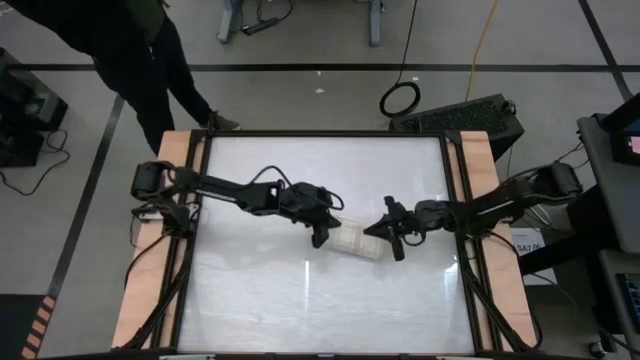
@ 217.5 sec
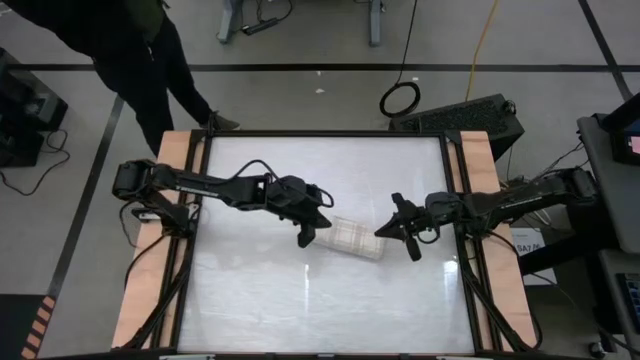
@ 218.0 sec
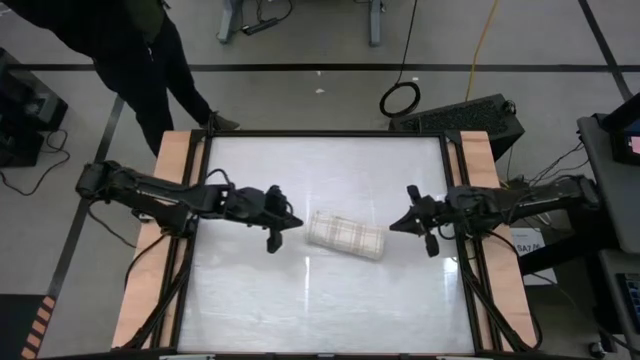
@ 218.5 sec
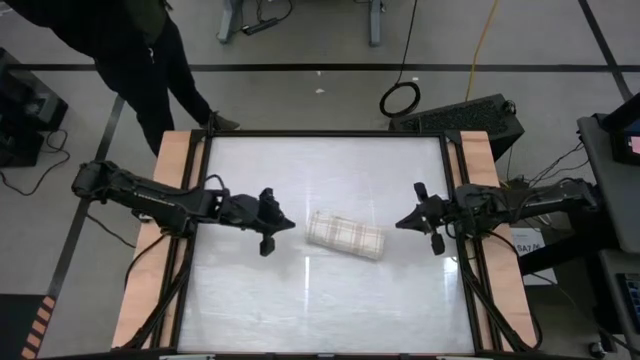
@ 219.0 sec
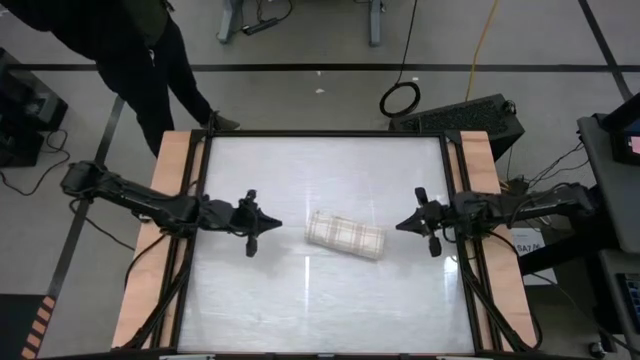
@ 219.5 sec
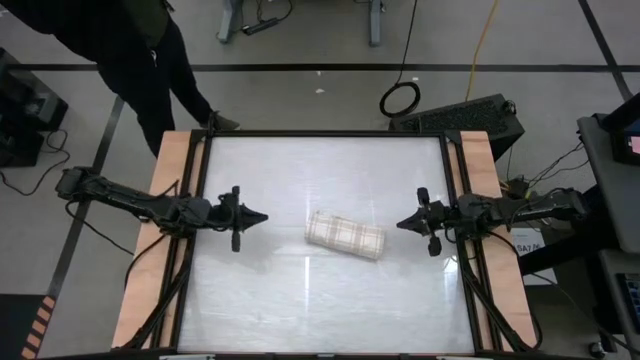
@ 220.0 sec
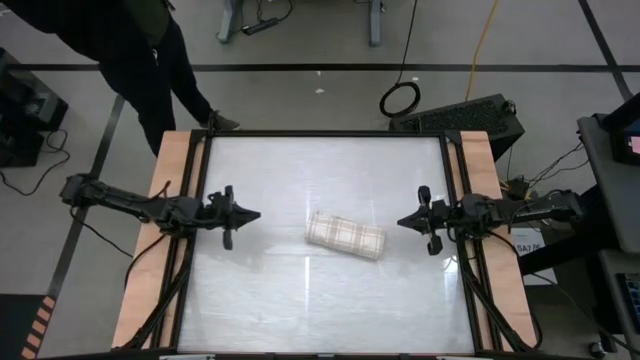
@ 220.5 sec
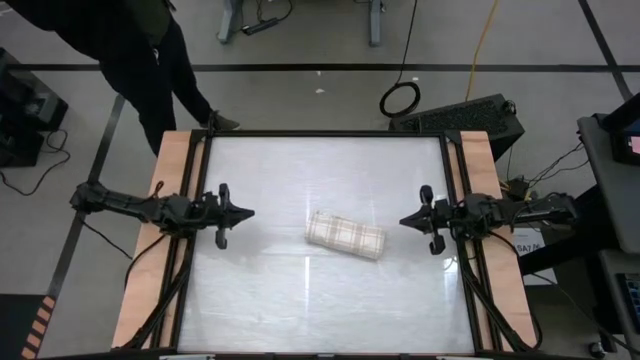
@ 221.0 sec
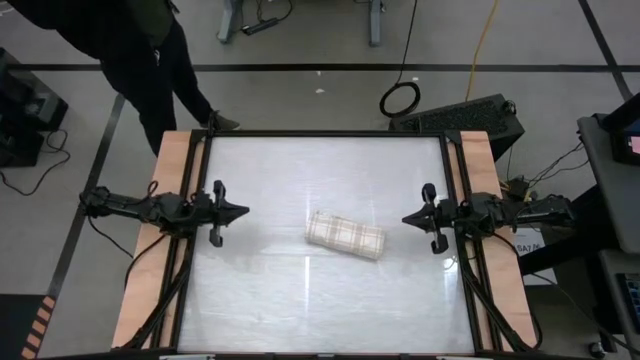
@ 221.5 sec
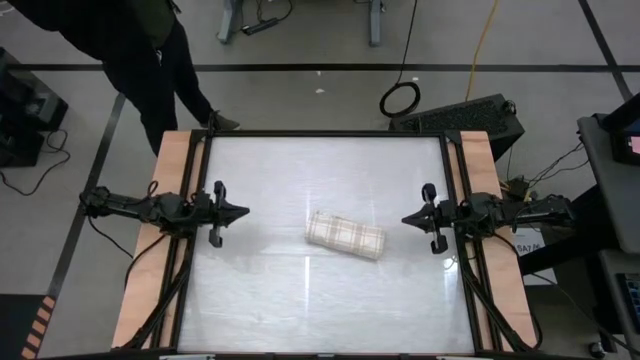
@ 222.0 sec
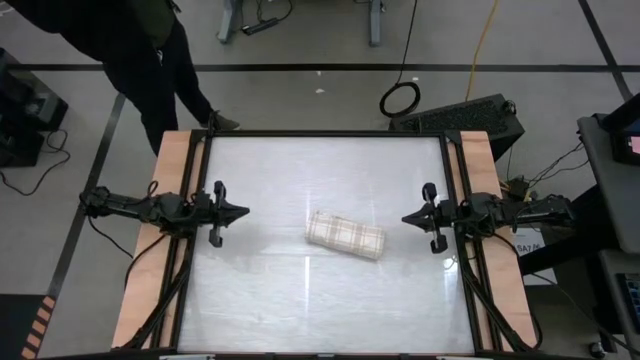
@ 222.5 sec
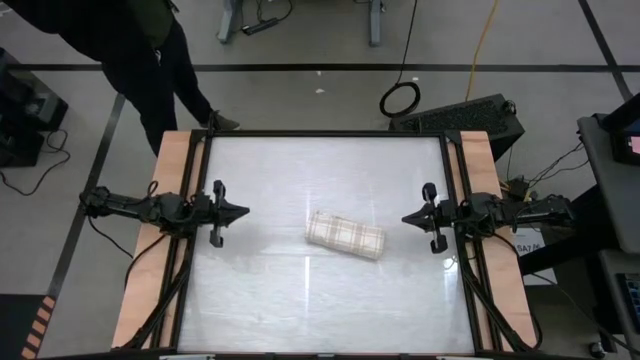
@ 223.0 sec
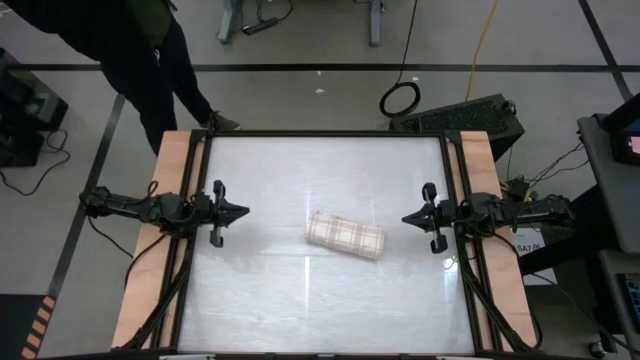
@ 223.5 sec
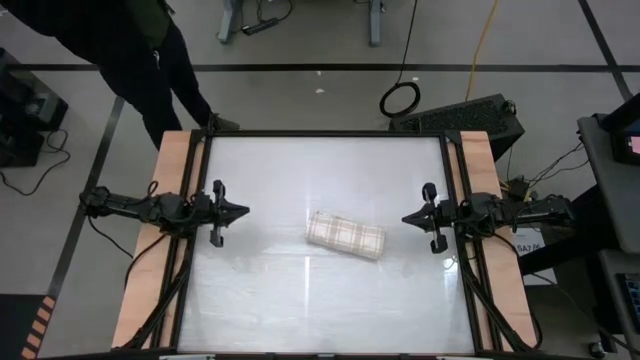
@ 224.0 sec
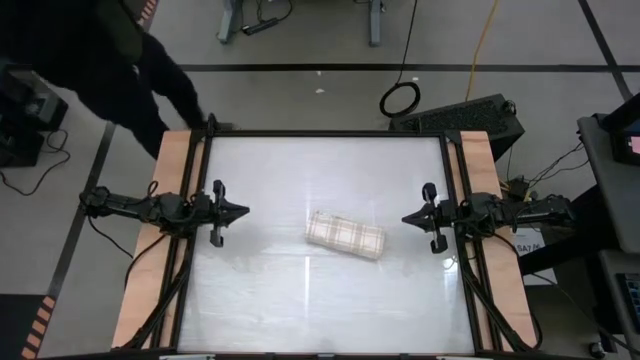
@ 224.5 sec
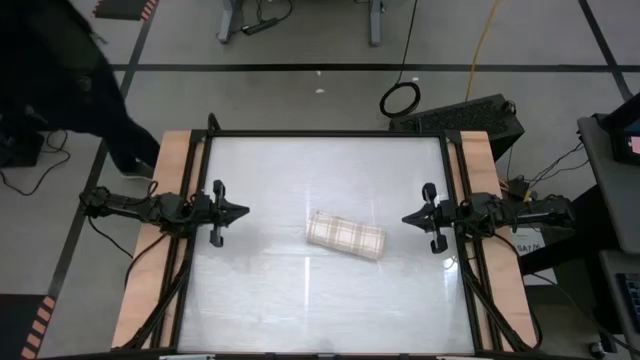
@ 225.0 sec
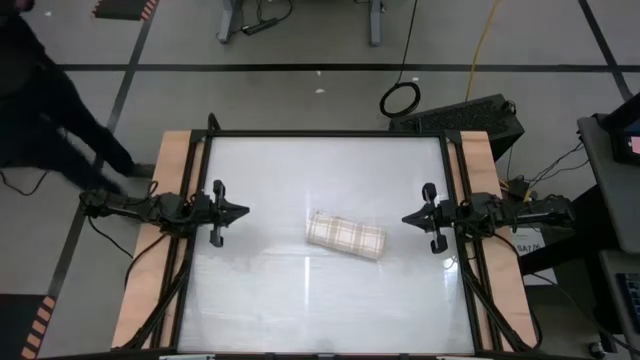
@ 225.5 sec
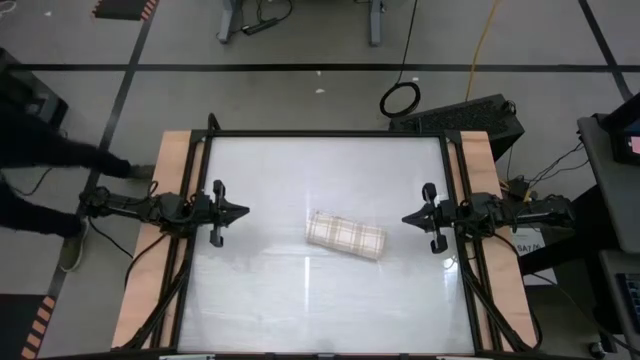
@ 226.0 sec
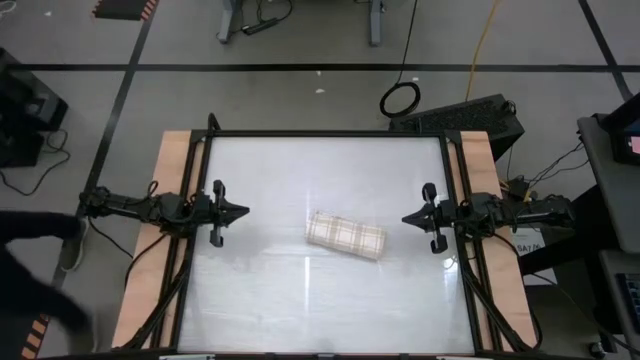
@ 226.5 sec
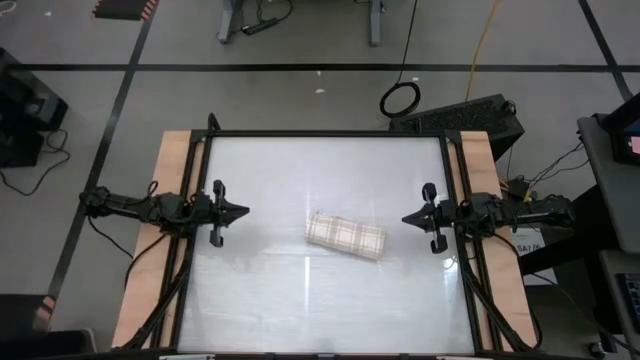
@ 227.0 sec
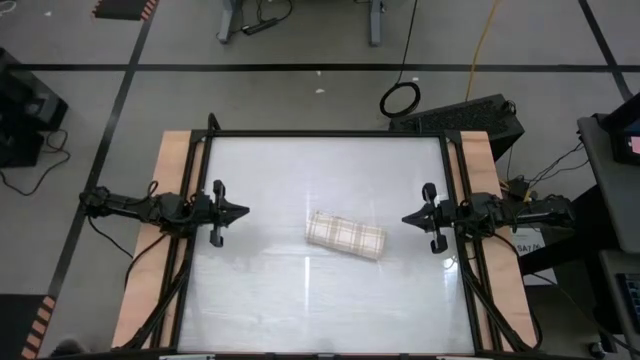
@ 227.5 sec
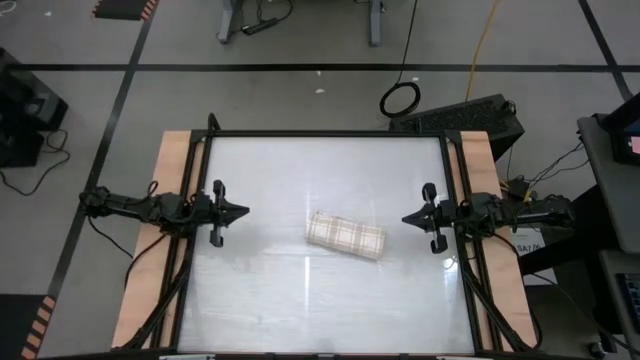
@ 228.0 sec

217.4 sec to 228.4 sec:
Task: Roll towel
Return to Home Position

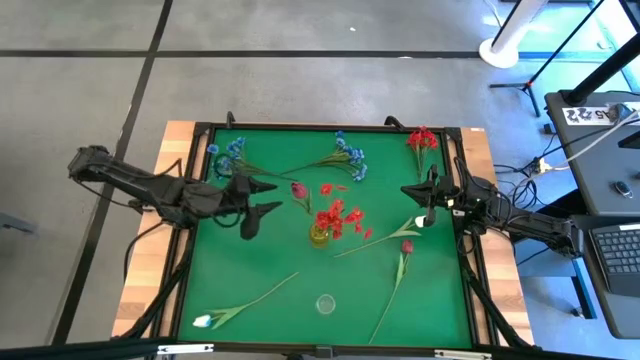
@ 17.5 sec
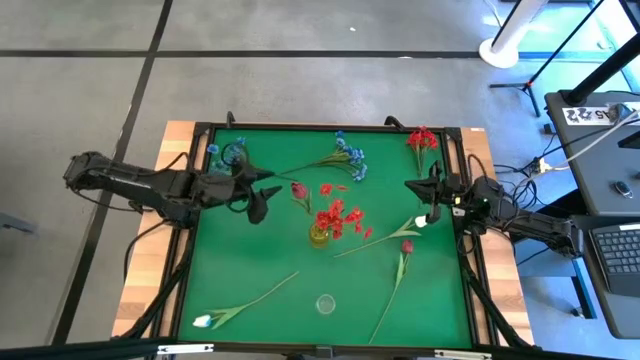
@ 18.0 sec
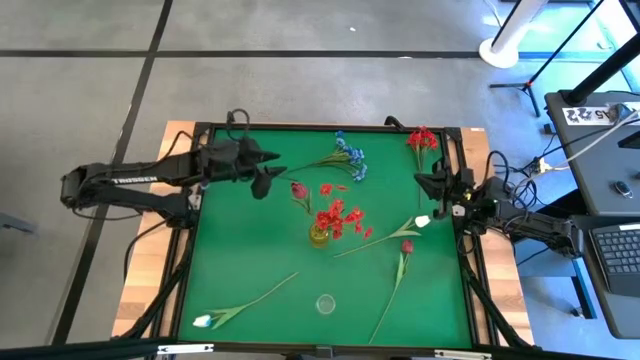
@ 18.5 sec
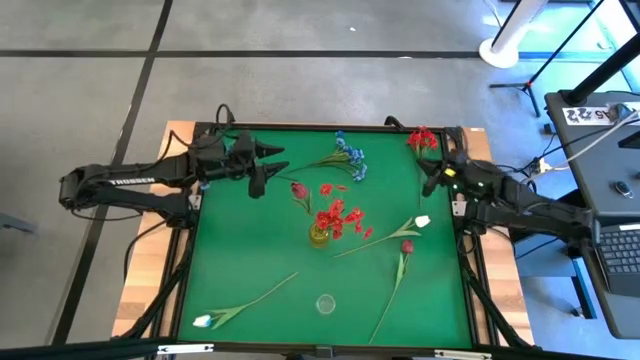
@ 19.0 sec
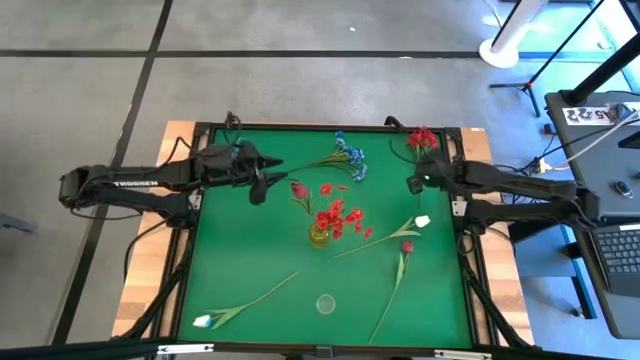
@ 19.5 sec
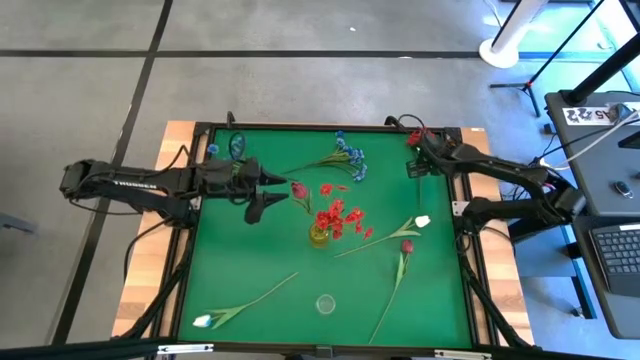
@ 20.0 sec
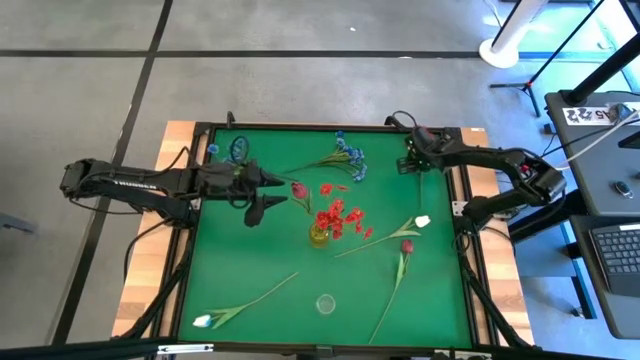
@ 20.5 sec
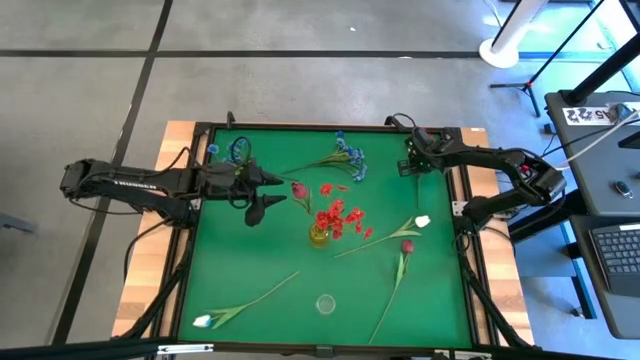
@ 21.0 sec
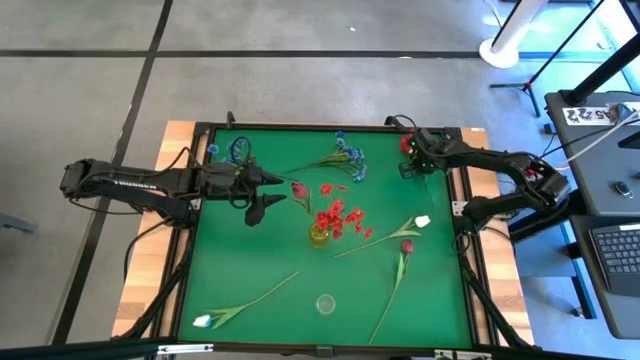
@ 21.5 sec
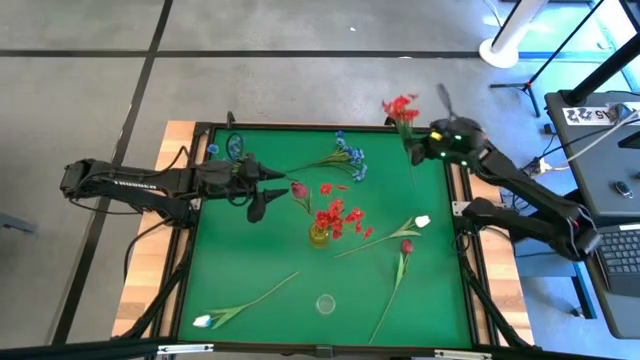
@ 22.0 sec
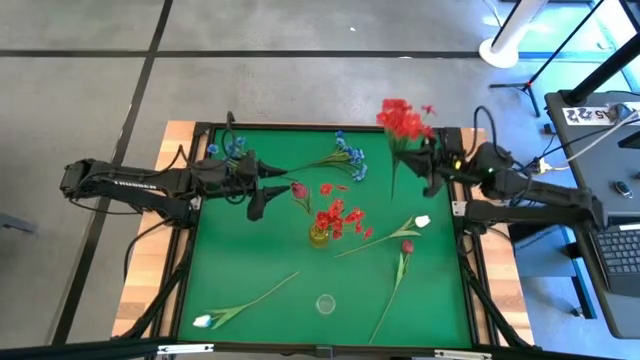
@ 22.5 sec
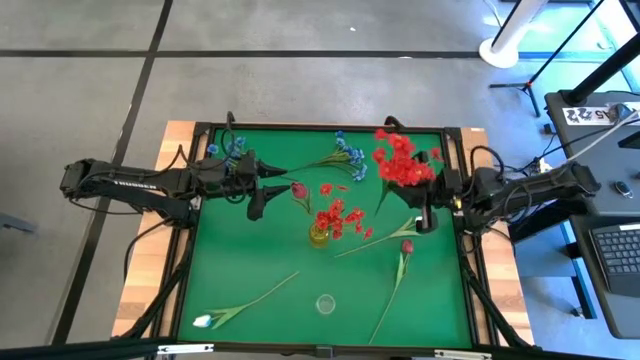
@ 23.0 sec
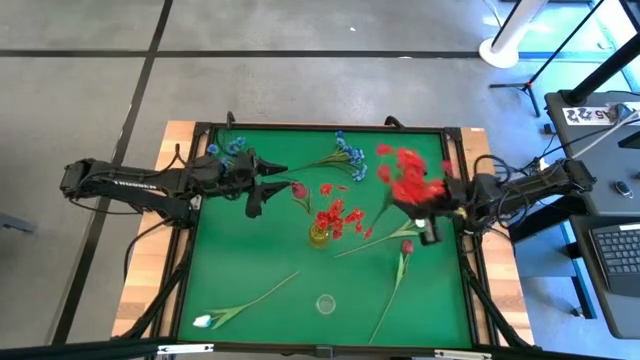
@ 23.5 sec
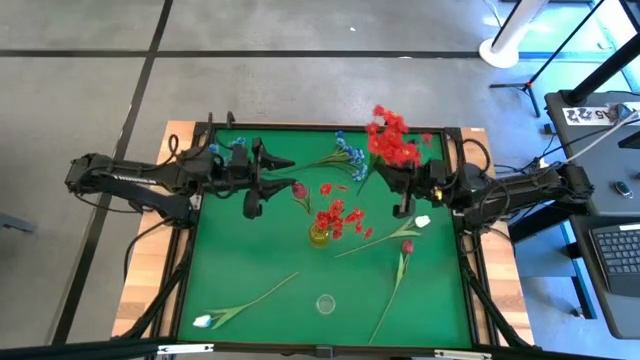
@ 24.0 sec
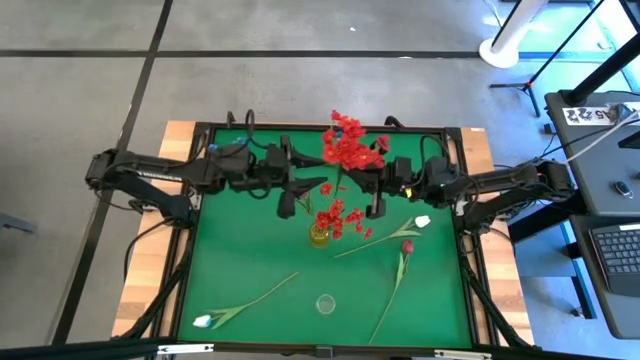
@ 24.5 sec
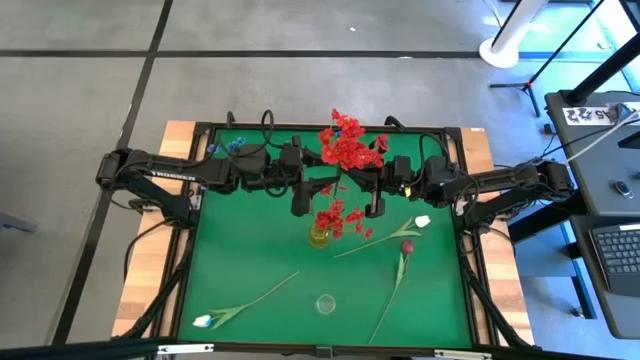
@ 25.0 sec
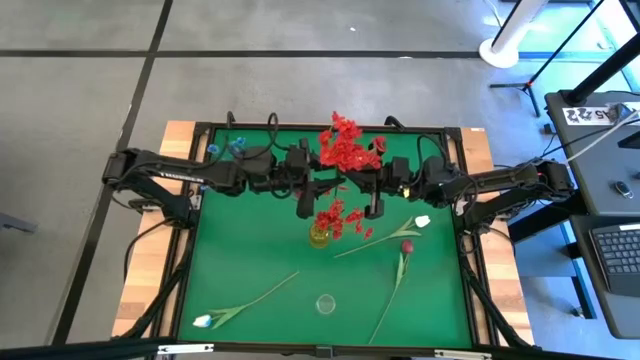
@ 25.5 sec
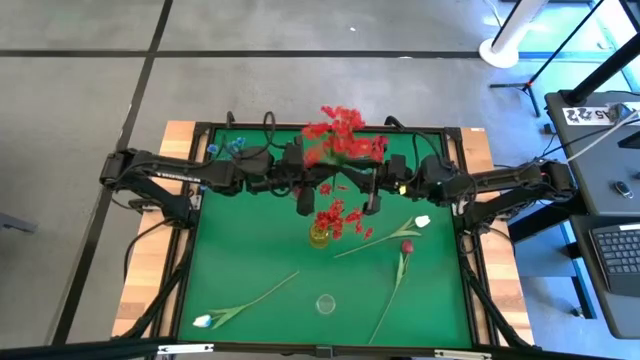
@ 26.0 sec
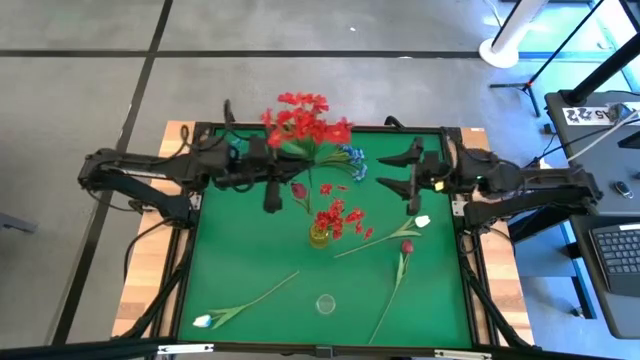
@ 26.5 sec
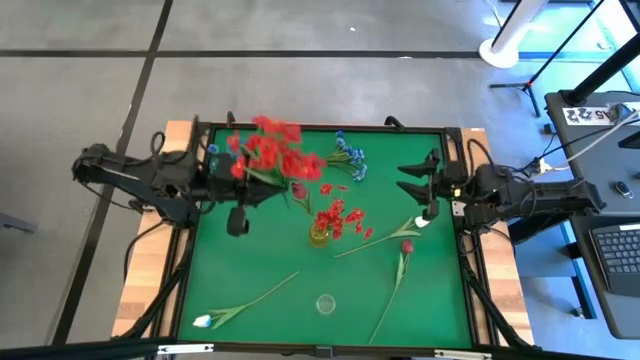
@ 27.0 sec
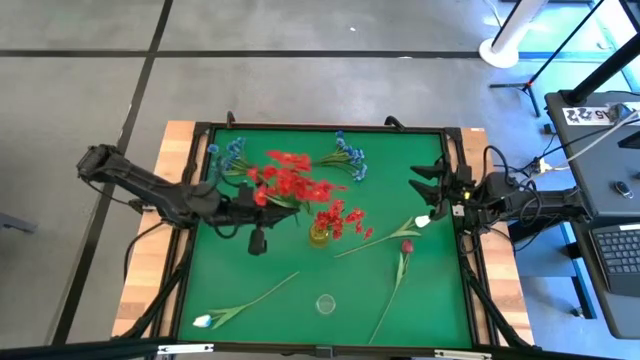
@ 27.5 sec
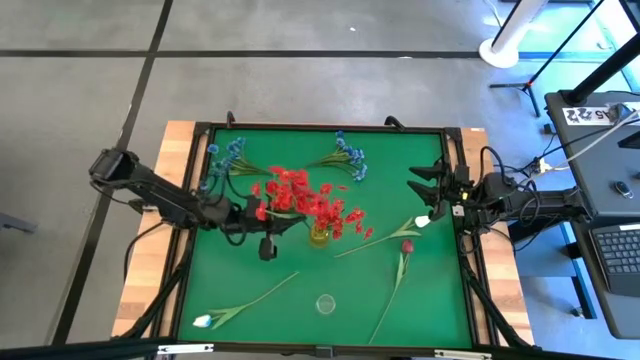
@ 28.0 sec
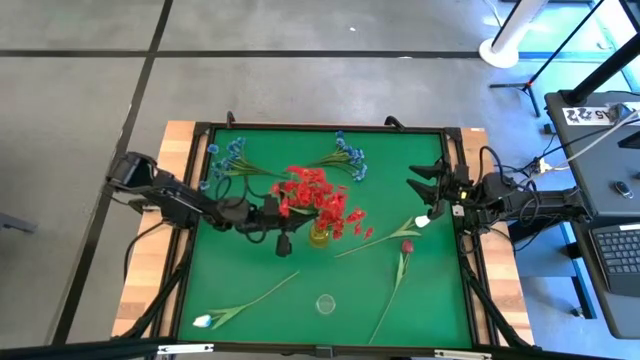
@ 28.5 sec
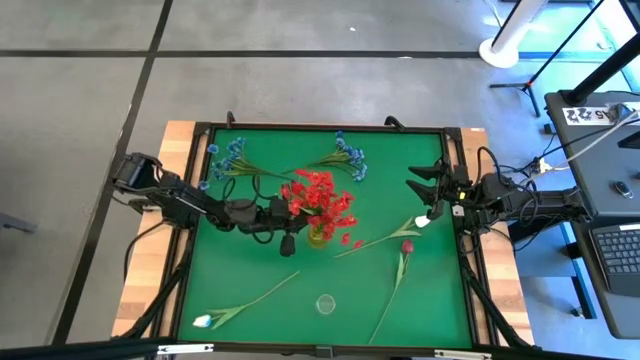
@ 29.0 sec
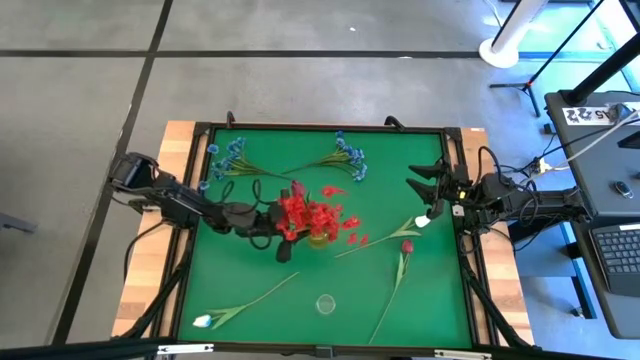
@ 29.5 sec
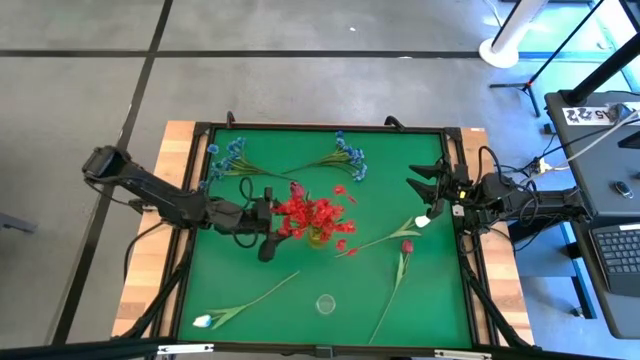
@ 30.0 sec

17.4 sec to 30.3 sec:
Task: Sort flowers into vase by color
Put the red flowers into the yellow vase
